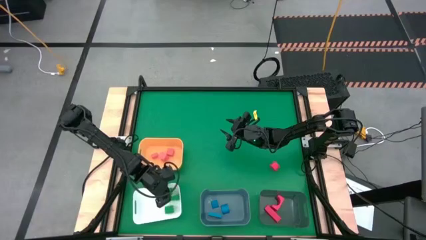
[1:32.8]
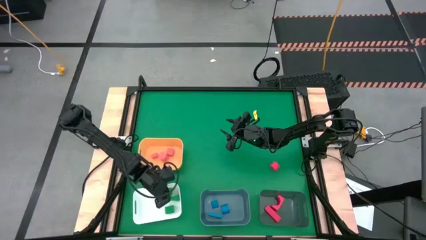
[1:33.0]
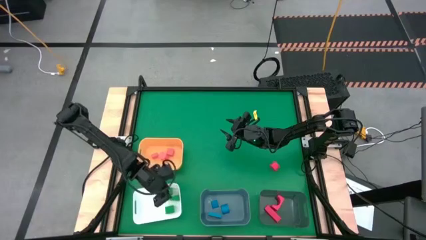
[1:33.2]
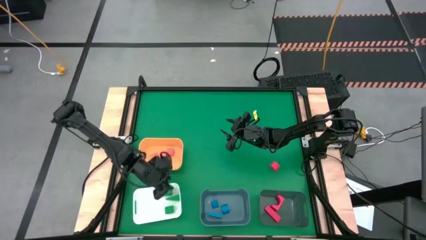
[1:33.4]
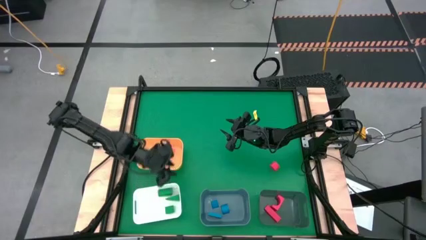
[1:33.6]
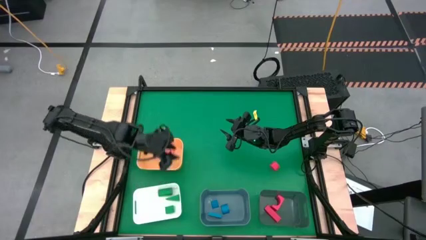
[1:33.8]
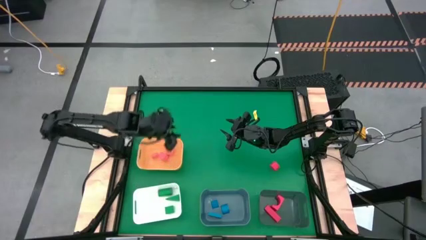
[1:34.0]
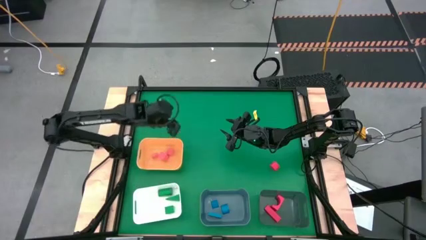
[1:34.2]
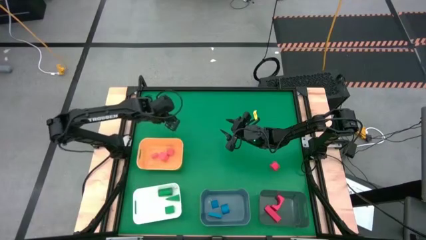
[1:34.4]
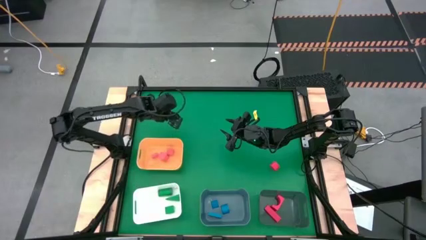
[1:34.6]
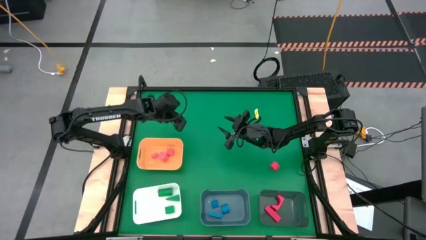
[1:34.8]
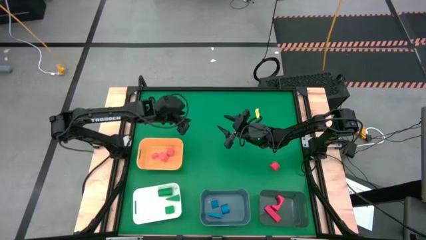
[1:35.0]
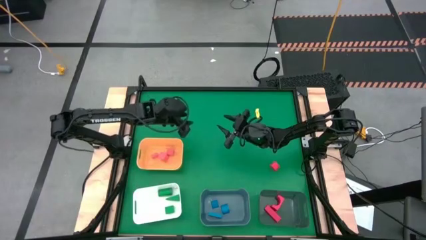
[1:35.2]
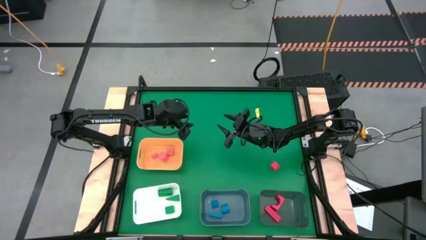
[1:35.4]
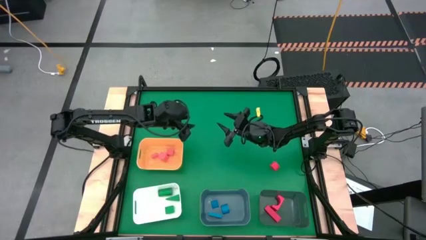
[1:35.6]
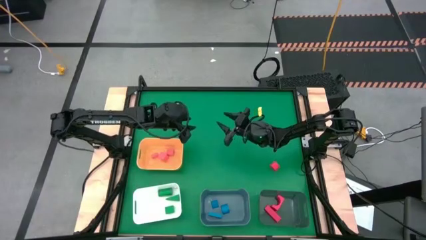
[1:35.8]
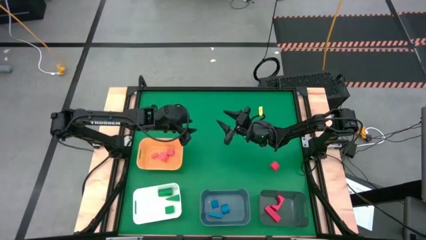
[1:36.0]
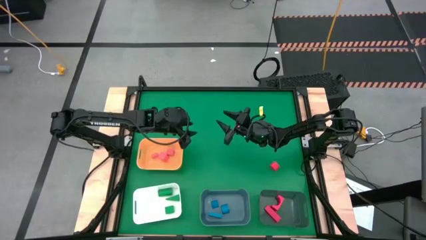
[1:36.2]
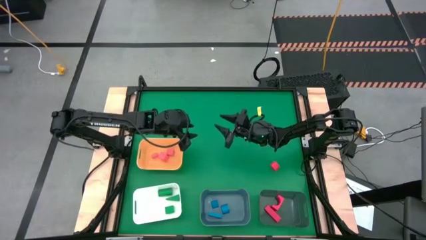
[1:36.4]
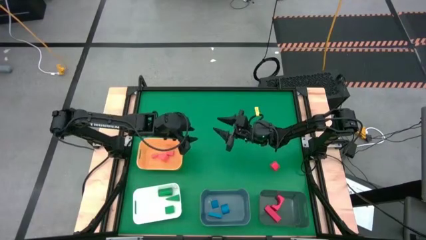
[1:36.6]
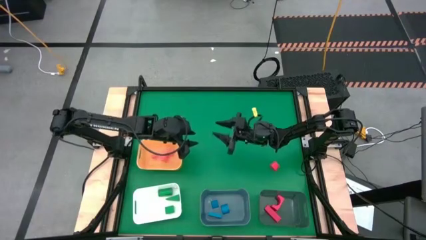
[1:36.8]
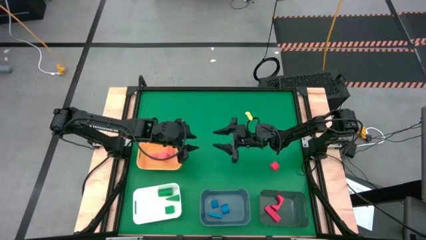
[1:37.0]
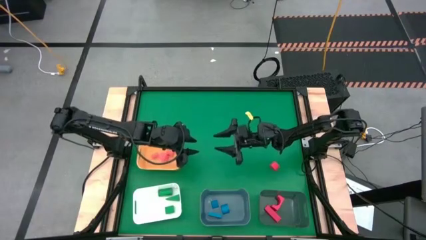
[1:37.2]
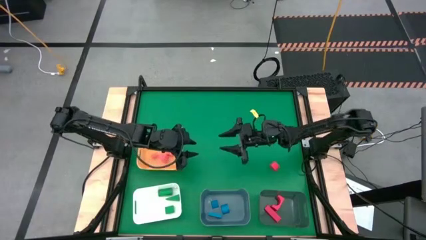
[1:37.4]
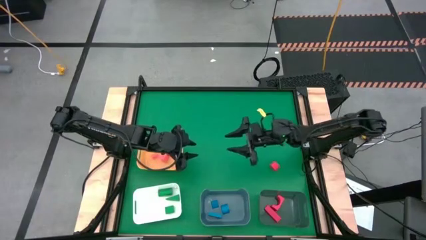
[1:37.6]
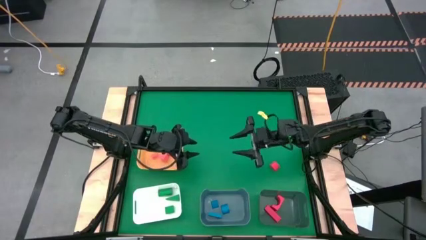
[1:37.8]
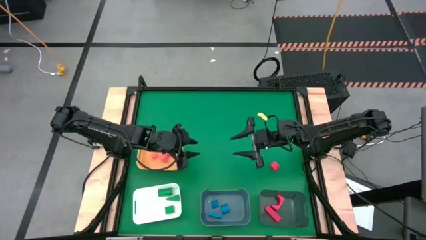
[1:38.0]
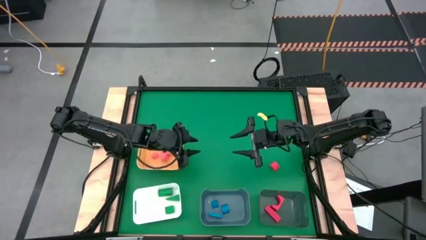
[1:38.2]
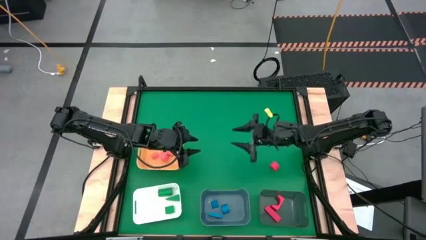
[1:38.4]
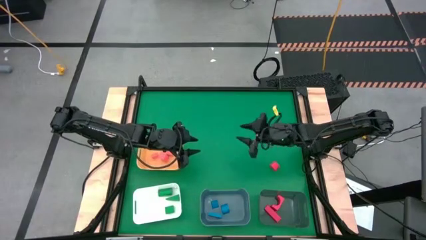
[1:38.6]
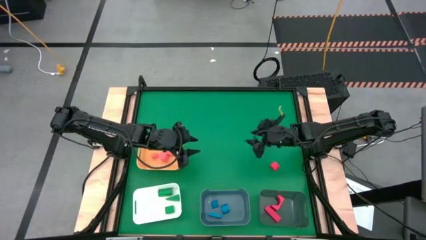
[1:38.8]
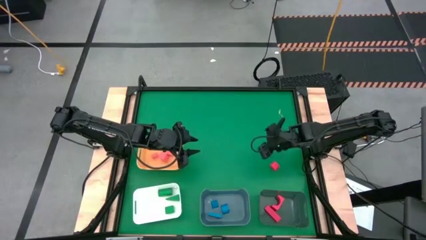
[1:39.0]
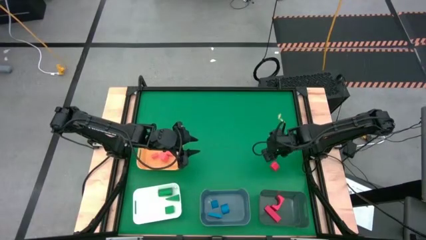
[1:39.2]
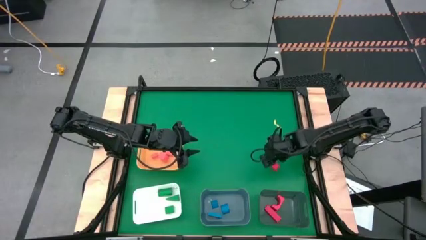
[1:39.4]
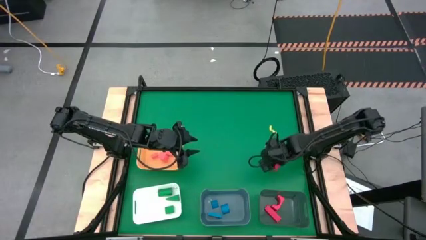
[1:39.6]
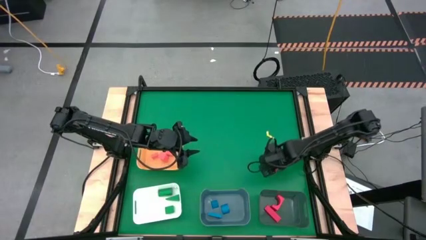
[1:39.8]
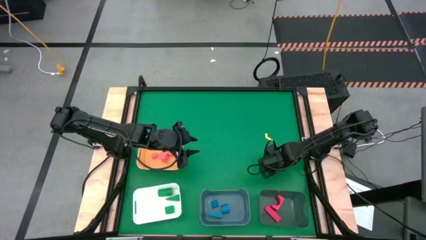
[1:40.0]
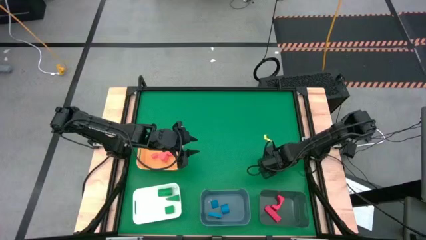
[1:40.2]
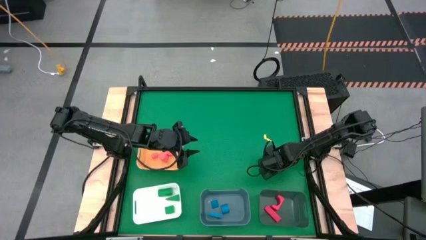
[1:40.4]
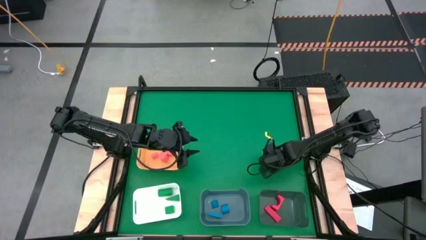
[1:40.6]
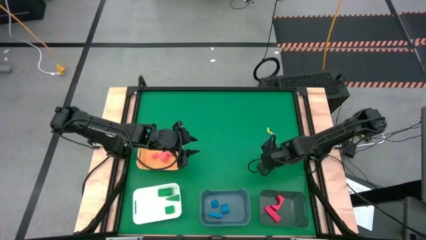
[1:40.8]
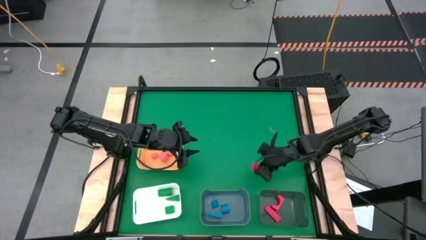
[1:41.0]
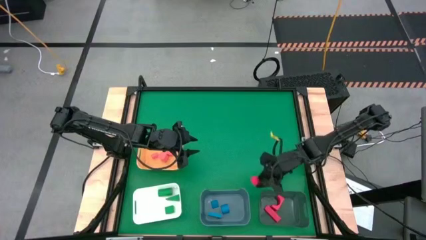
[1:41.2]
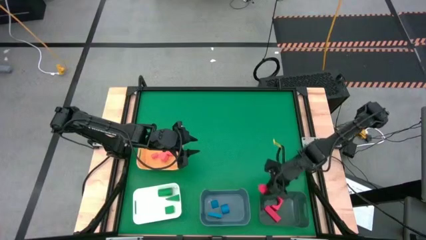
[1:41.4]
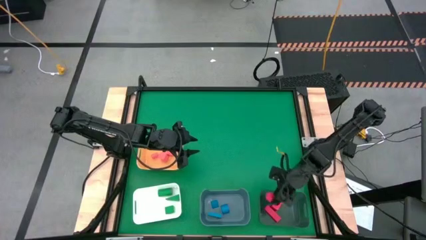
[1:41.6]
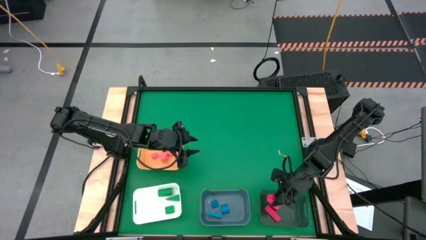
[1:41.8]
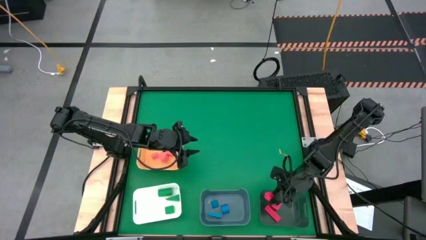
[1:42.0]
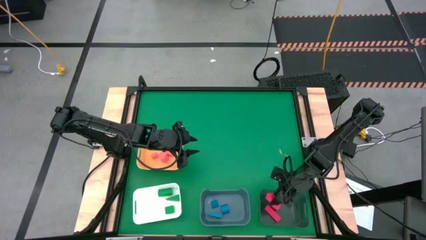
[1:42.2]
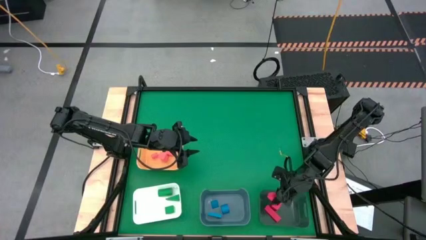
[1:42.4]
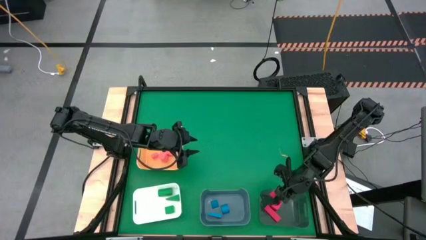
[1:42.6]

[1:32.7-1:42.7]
Task: Sort & place blocks by color
Put the red block into the gray bin

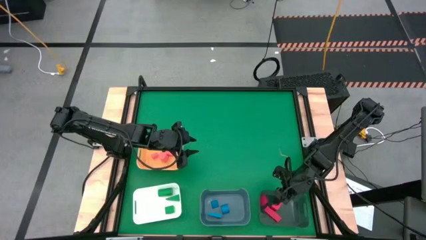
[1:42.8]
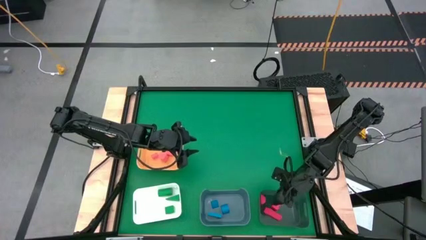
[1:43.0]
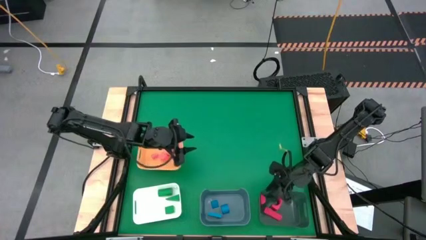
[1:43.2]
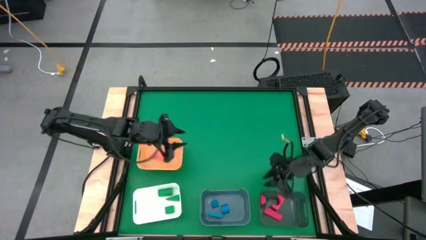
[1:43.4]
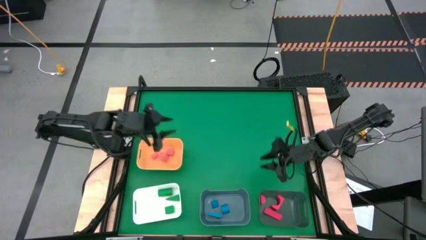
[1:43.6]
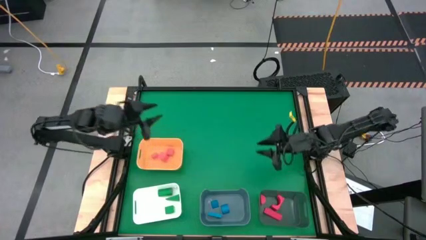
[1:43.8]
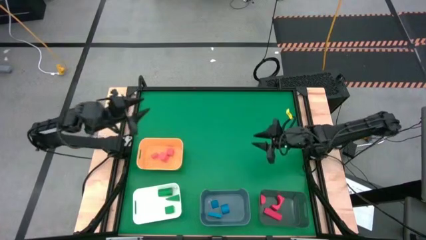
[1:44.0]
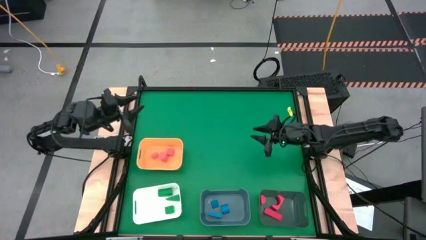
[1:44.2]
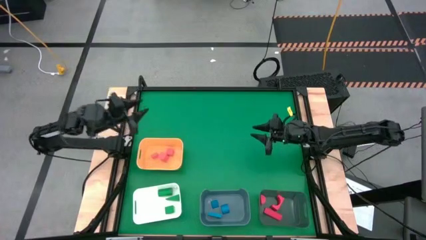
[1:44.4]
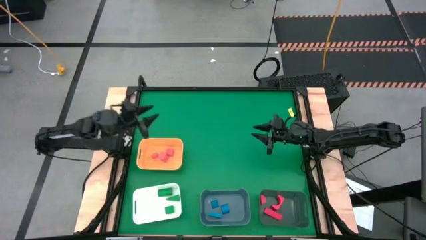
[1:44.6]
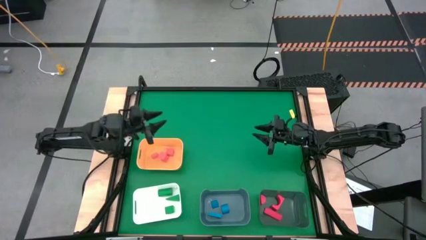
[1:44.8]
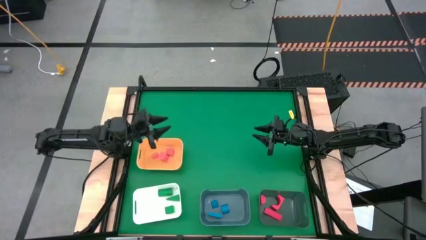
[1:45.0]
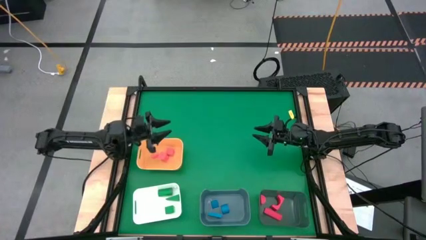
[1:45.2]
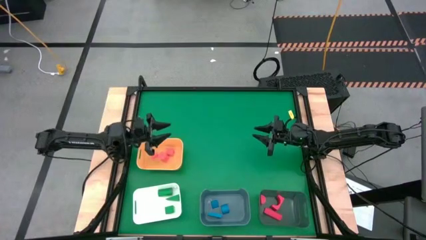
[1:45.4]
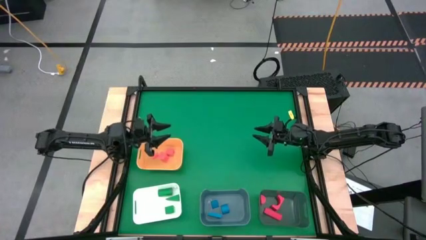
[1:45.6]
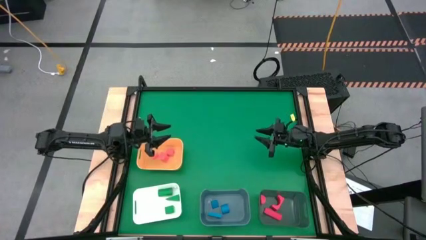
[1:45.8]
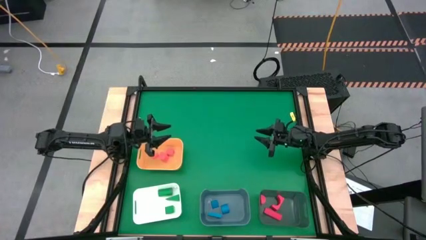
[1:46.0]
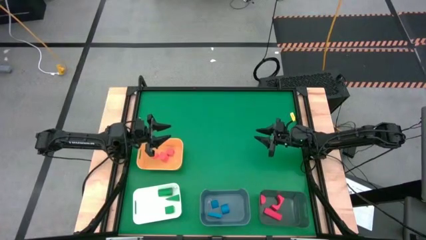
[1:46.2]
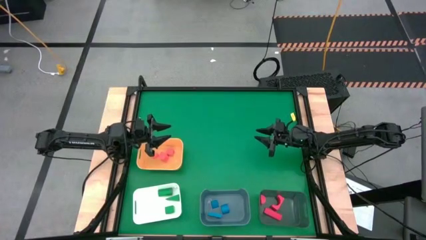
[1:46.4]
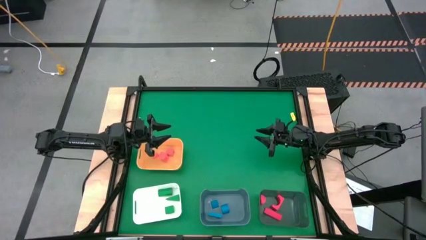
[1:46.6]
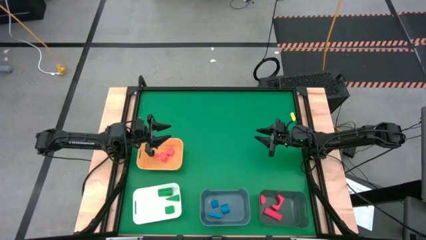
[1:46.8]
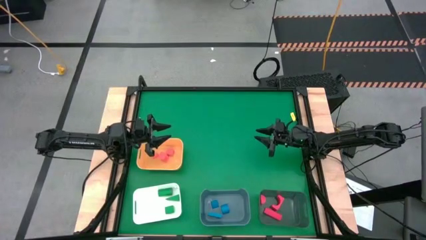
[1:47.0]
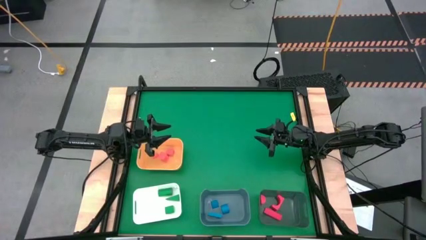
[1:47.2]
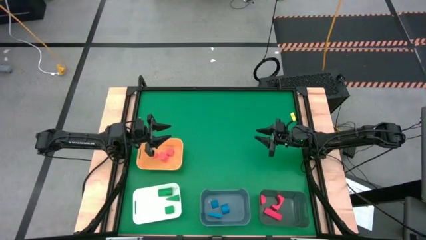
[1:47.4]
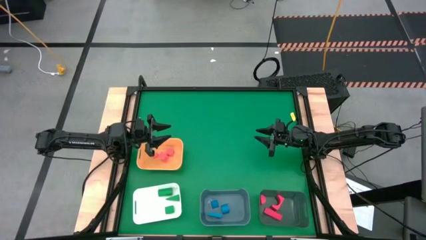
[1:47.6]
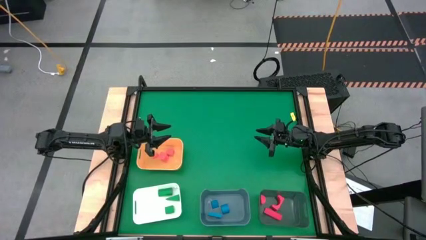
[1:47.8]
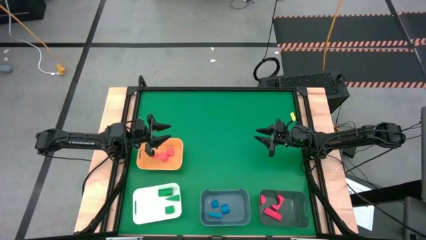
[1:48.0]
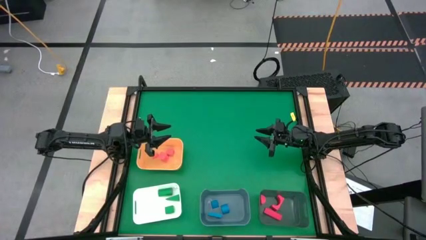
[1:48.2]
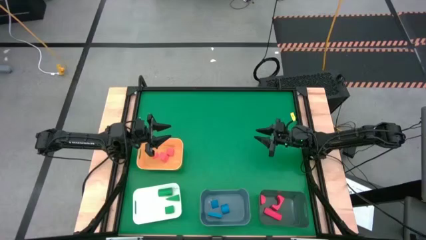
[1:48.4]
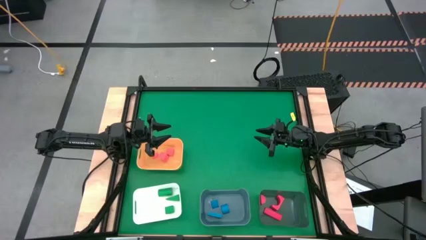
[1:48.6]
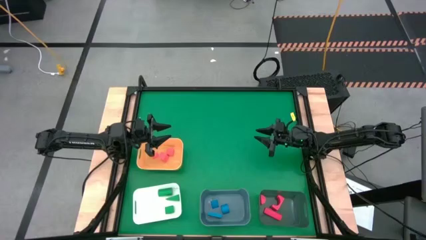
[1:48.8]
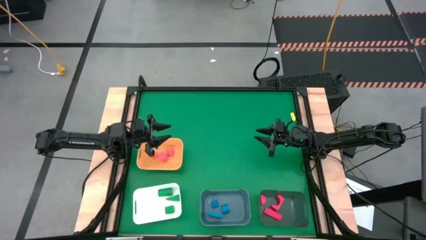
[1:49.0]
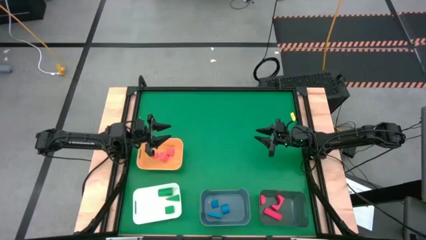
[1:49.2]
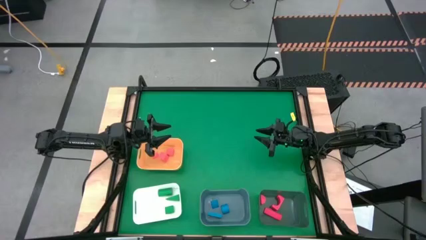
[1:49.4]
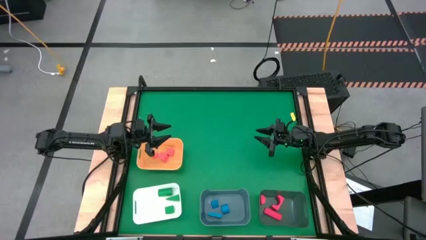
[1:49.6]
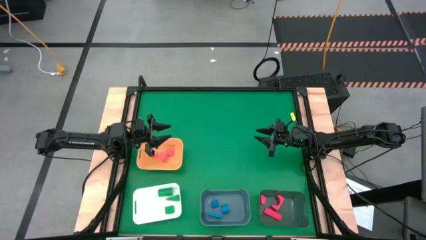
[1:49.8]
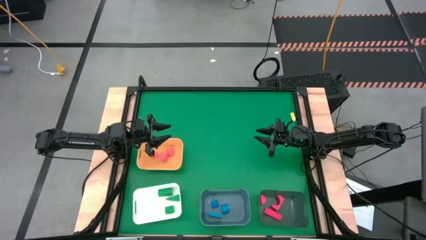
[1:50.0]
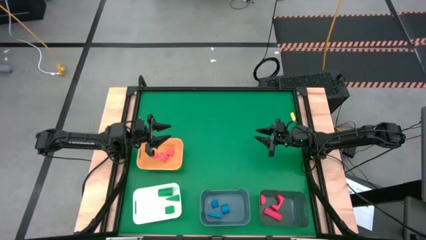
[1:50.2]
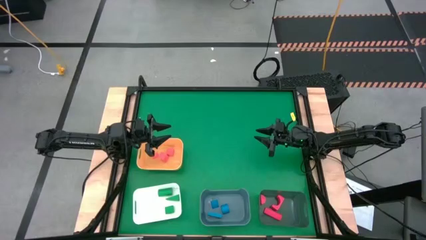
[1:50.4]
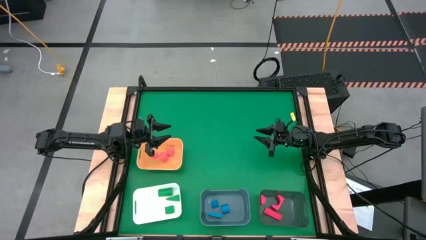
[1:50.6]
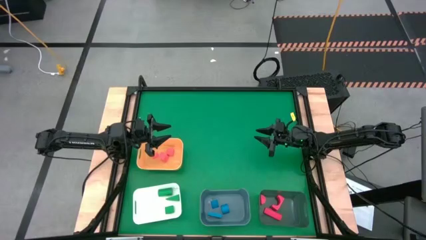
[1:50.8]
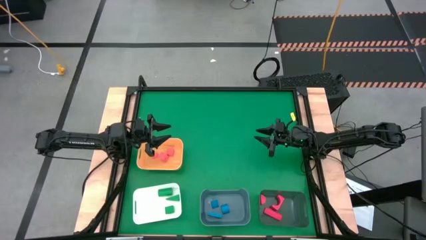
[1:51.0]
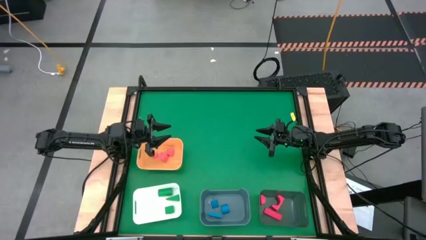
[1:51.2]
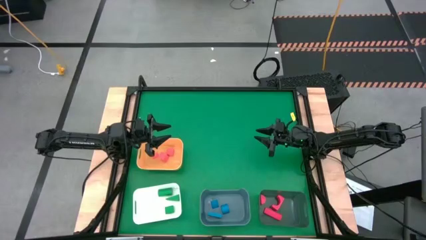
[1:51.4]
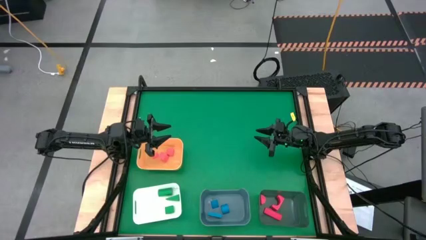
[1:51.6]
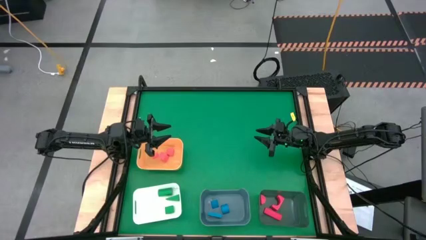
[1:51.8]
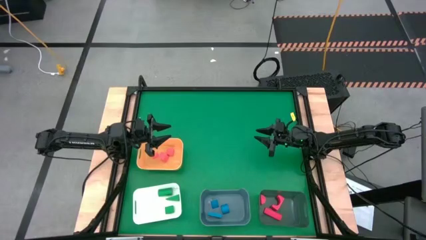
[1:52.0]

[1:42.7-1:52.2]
Return to Home Position
